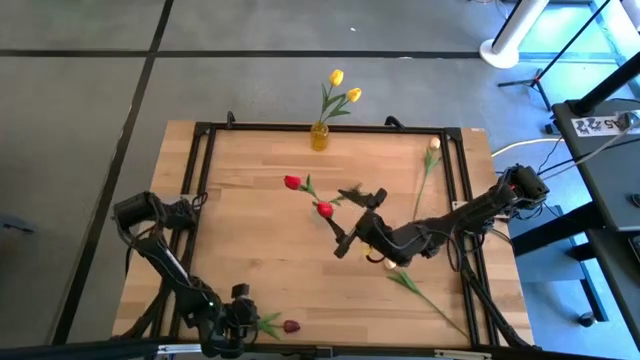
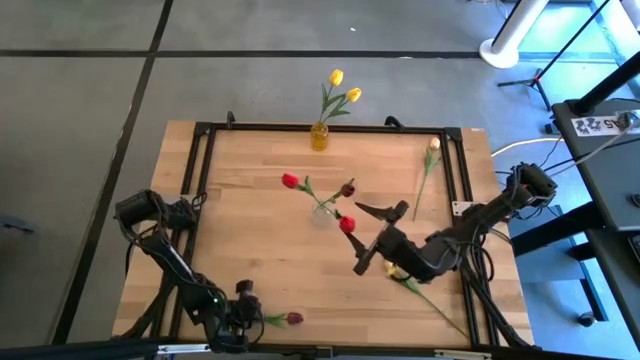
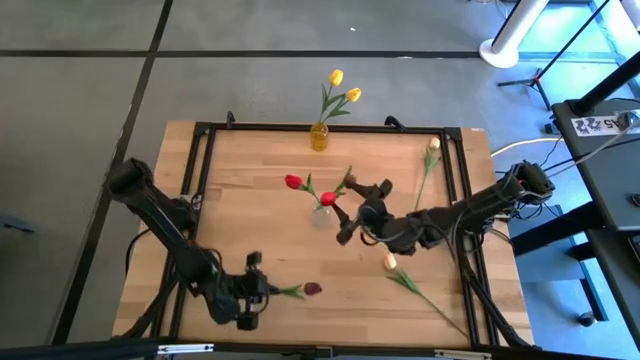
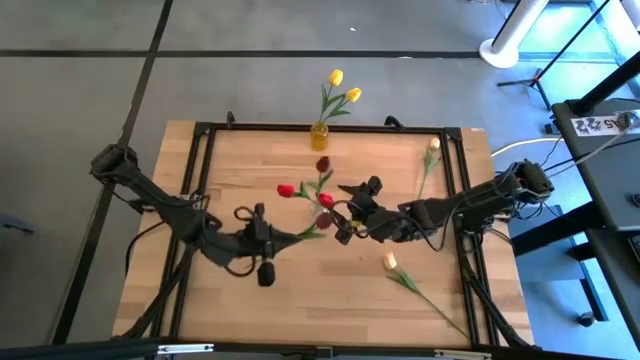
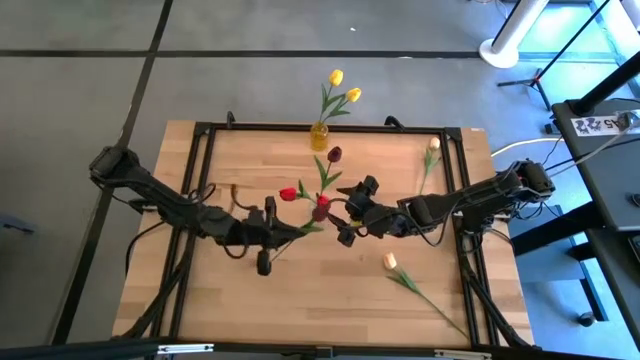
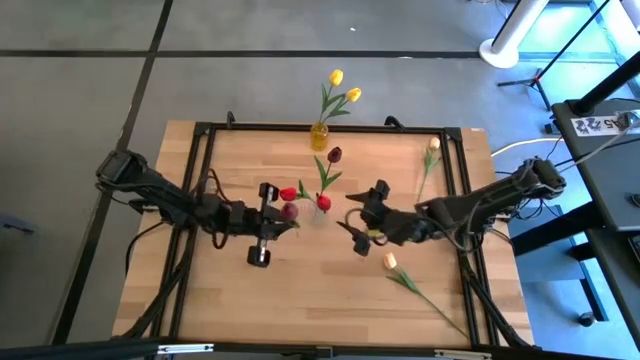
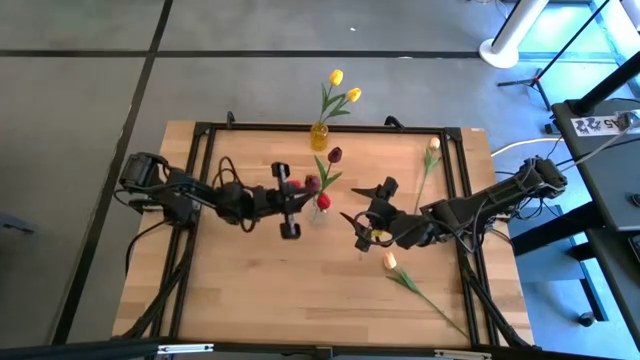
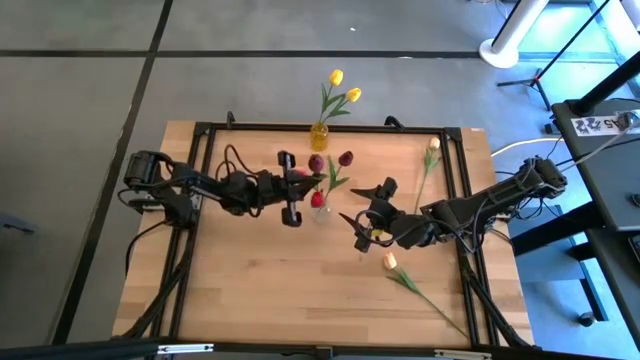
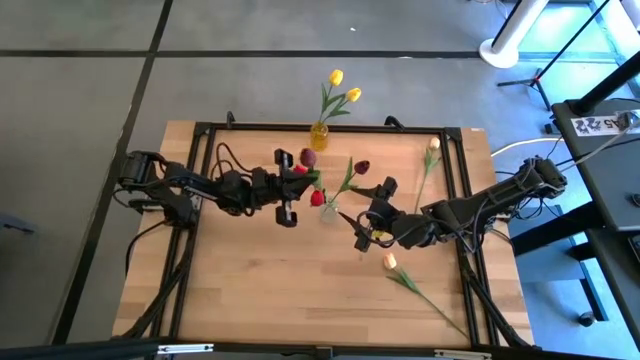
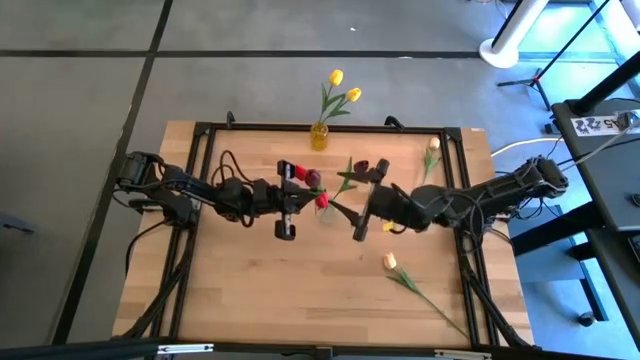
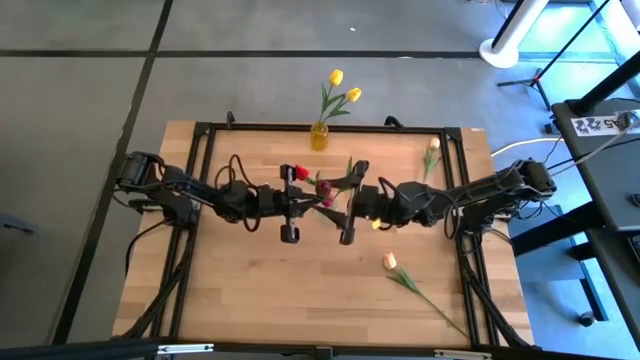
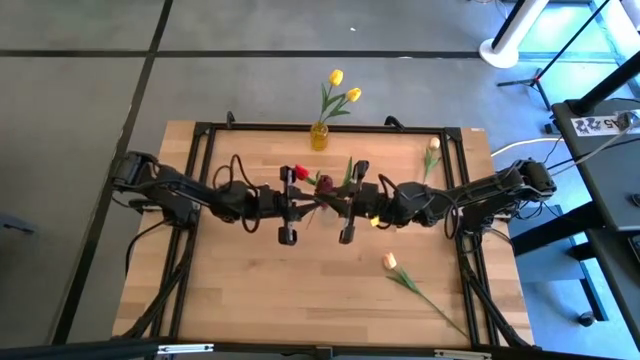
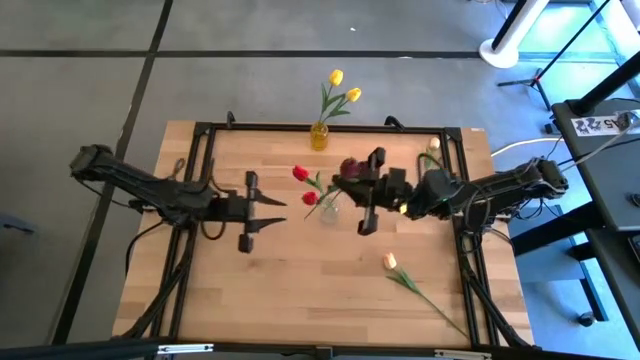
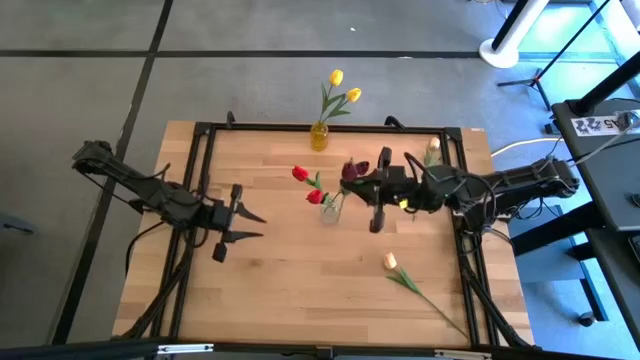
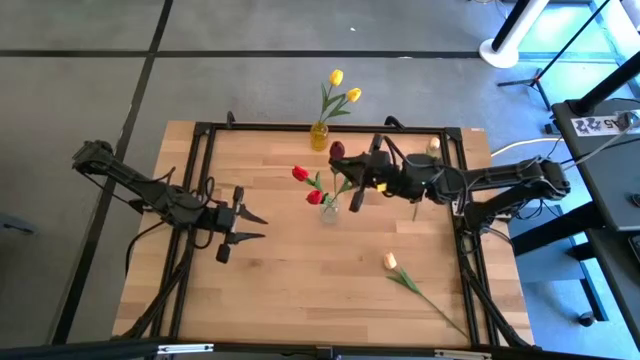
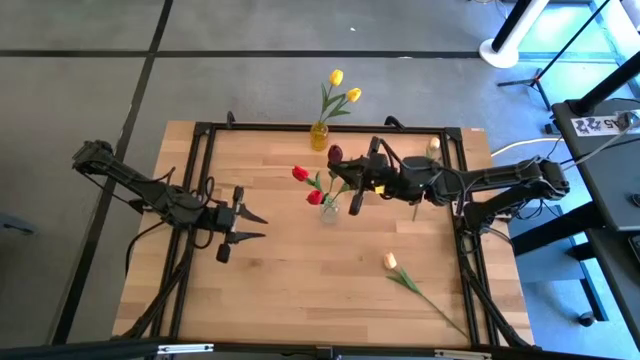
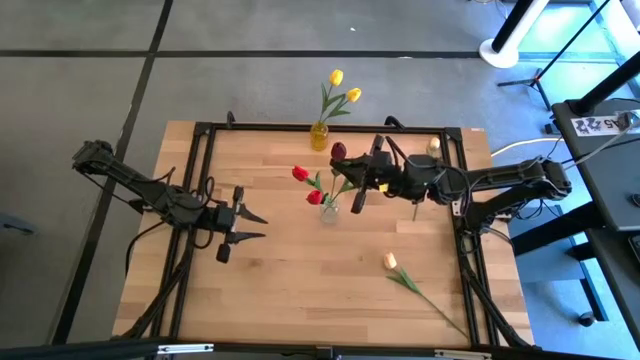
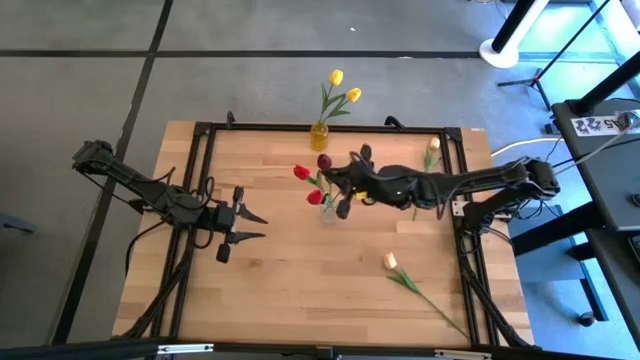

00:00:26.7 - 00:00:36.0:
Task: Sort flowers into vase by color
Put the dark red tulip into the transparent vase

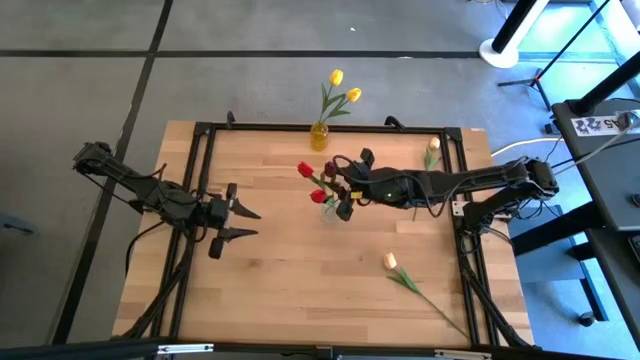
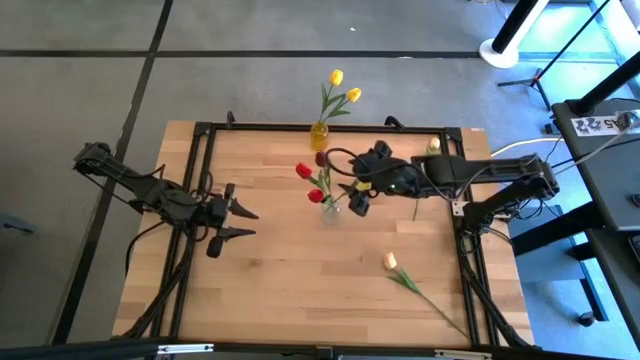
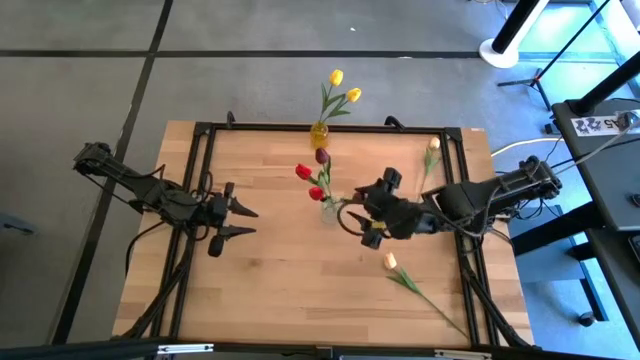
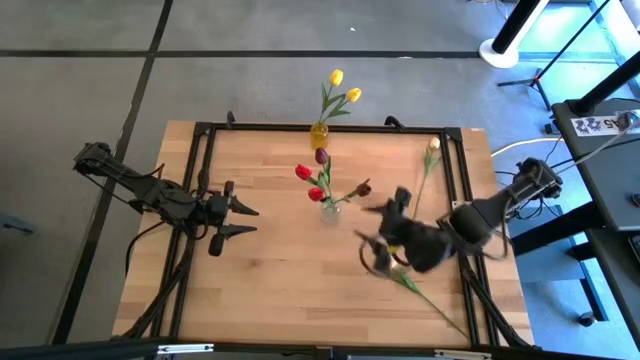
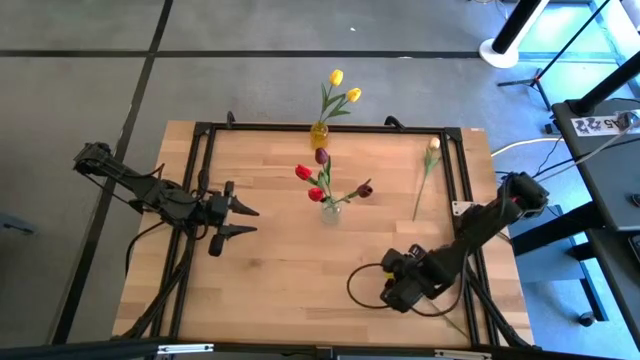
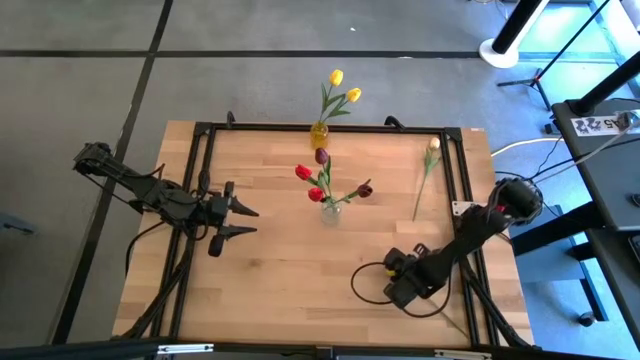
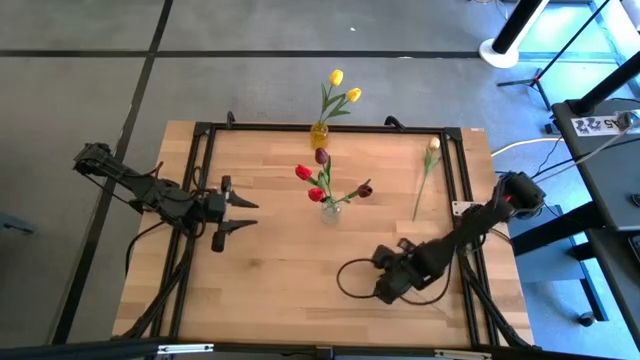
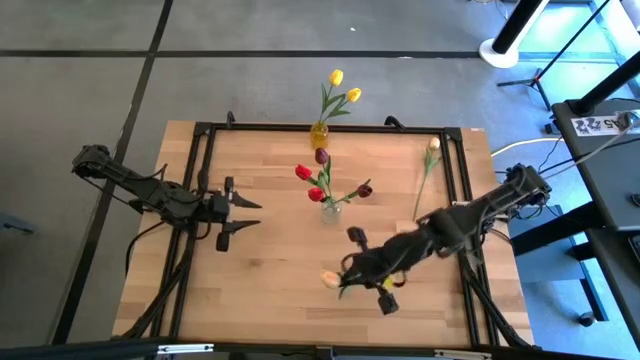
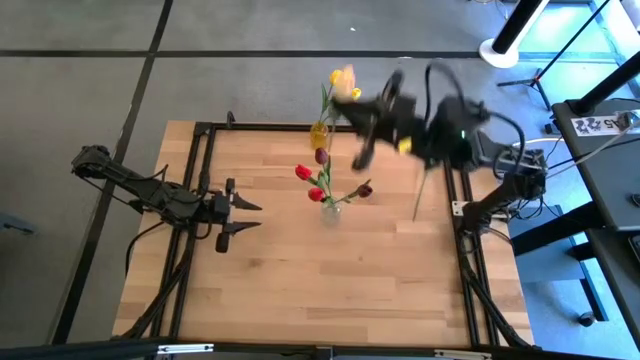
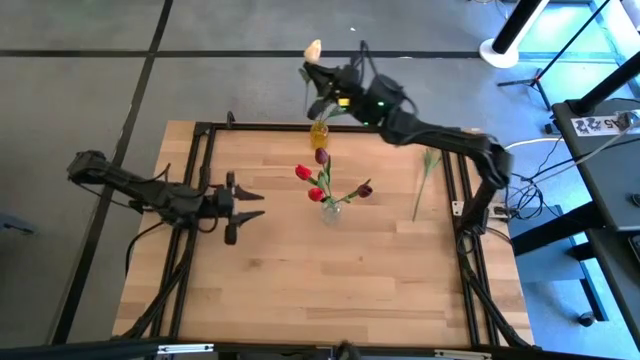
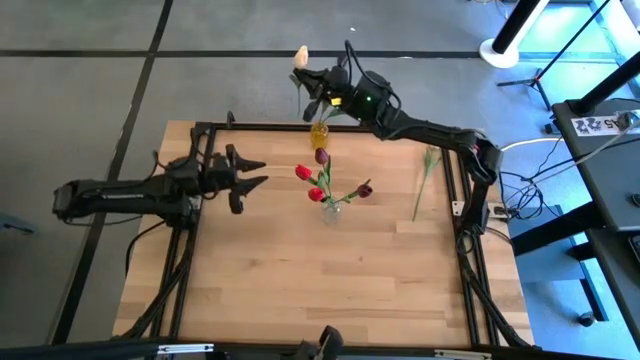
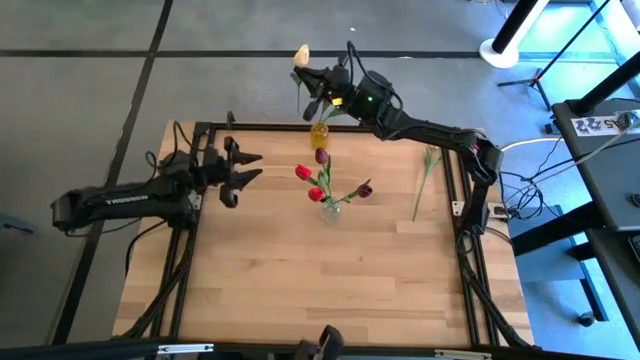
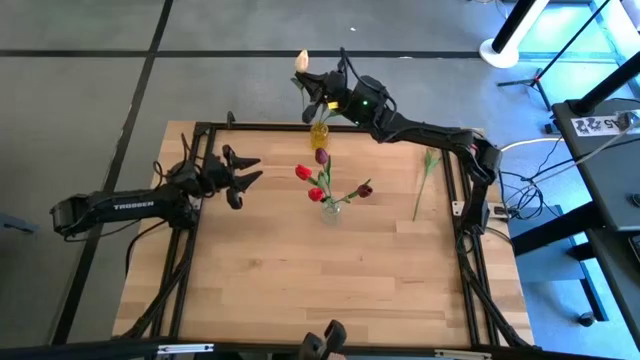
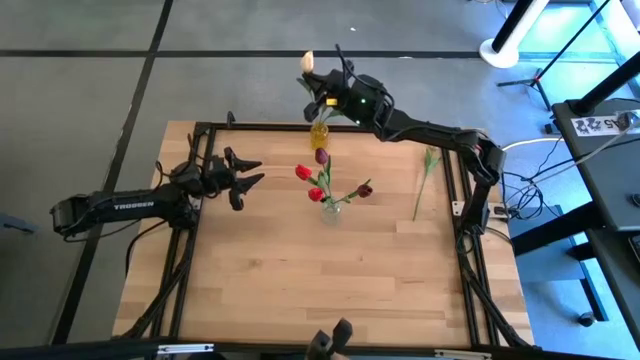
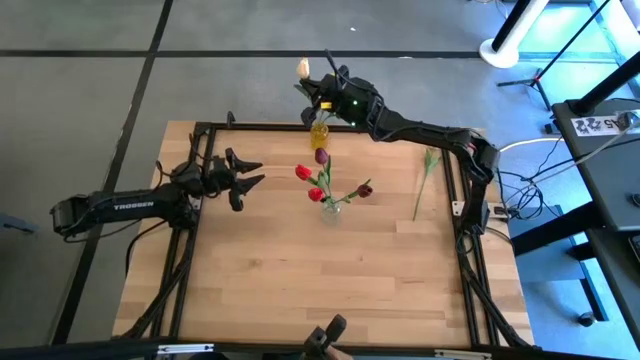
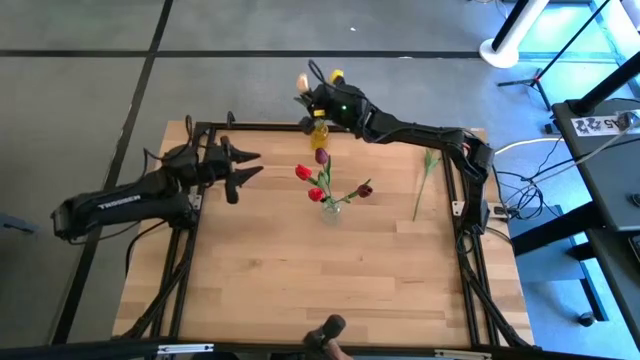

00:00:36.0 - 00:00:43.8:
Put the bottom white tulip into the yellow vase

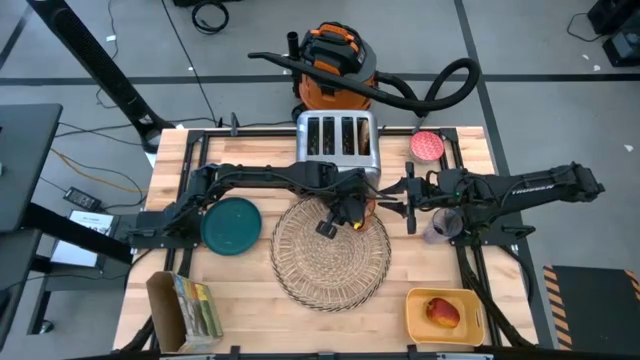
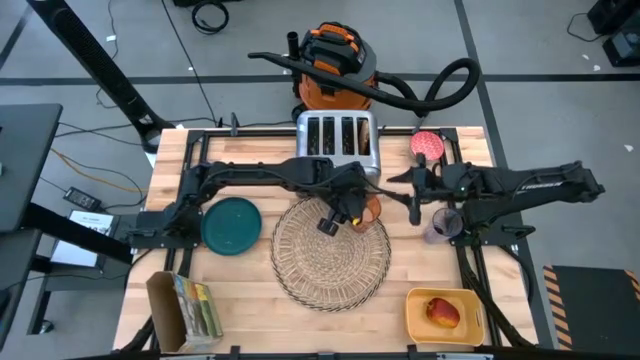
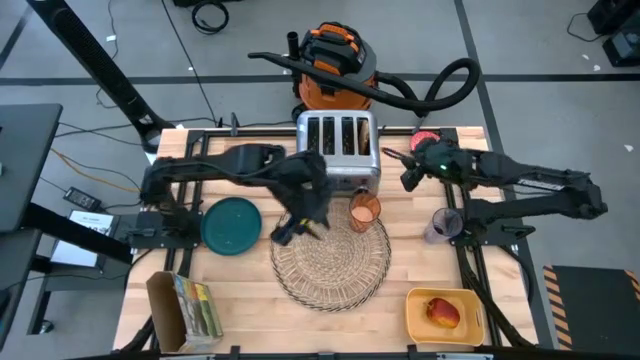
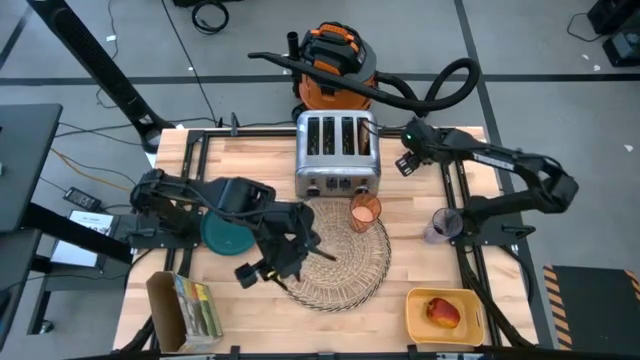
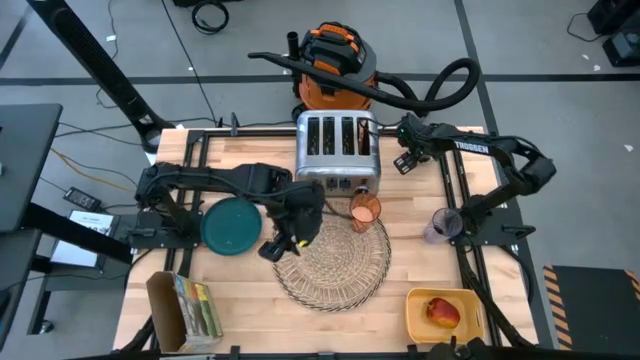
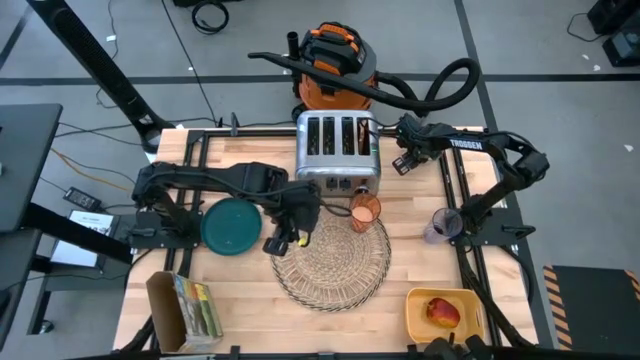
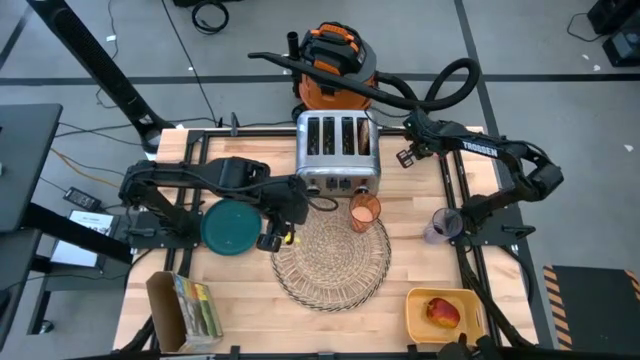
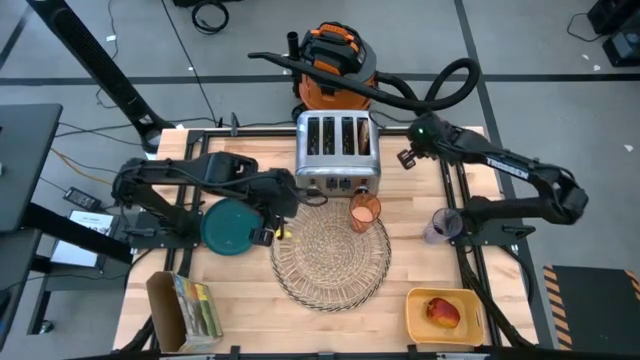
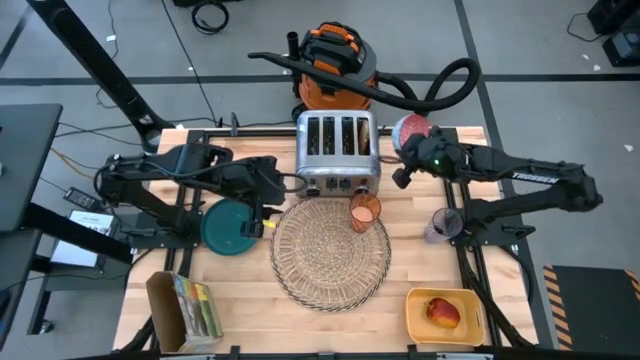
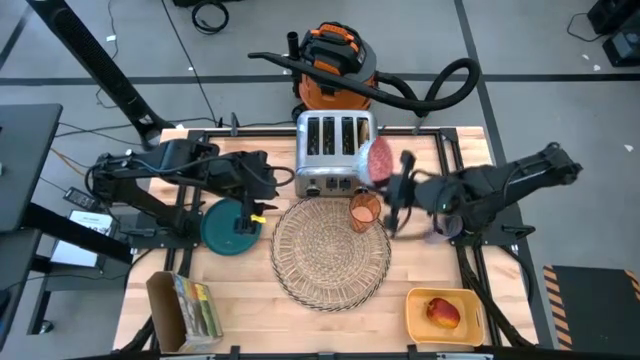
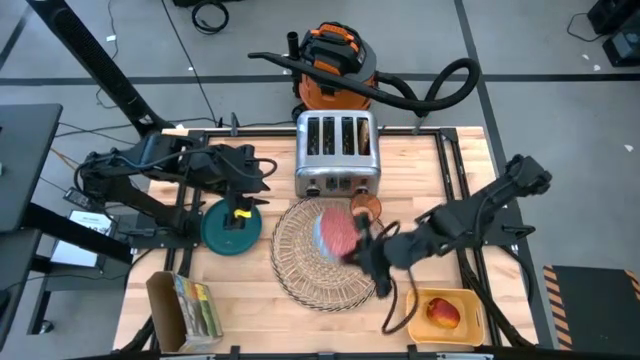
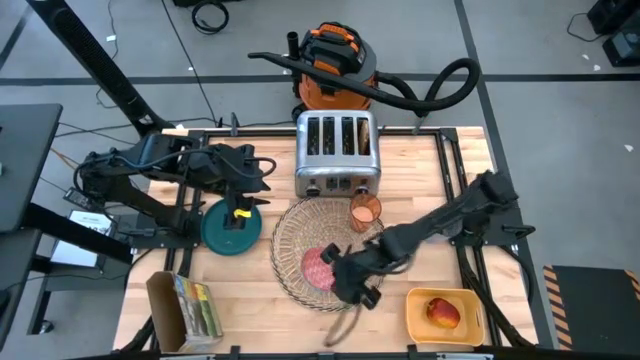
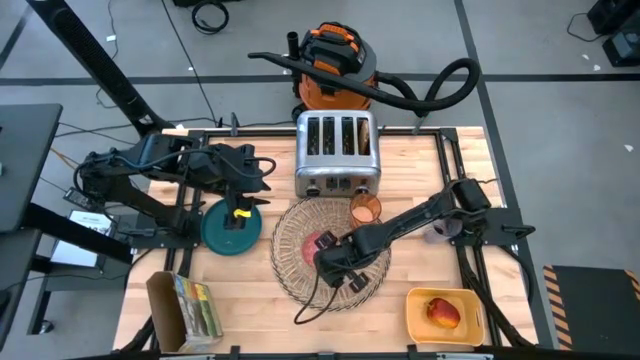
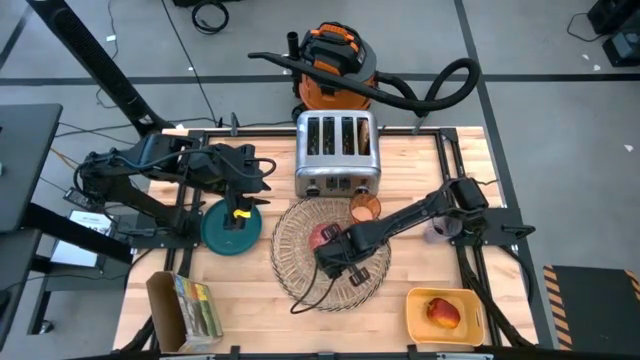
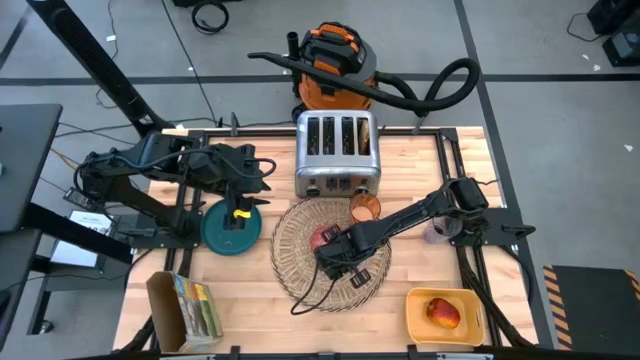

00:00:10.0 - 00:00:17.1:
Task: Arrange a breakfast setting
Put the red patterned bowl on the brown placemat to the bottom left of the orange glass of milk
